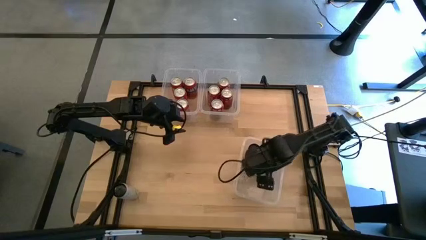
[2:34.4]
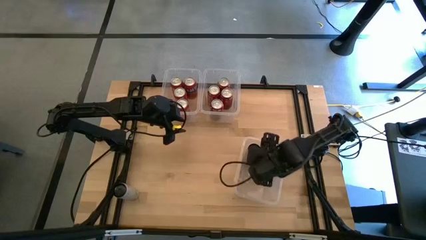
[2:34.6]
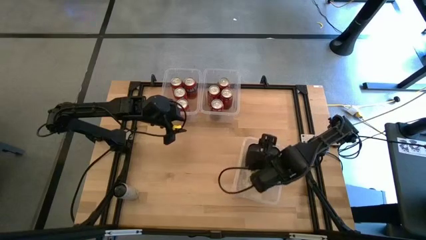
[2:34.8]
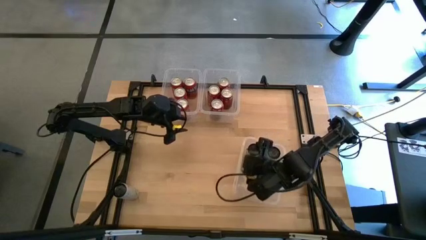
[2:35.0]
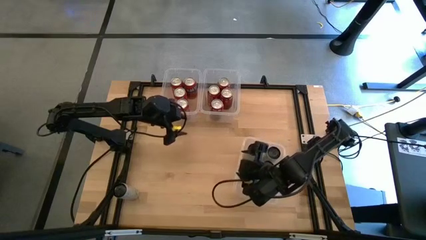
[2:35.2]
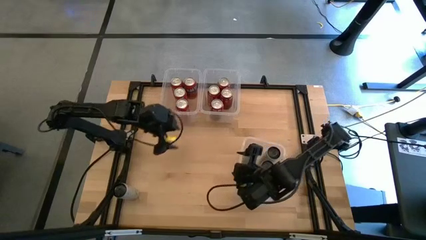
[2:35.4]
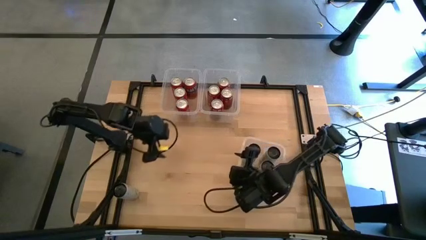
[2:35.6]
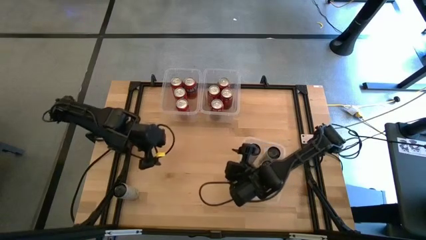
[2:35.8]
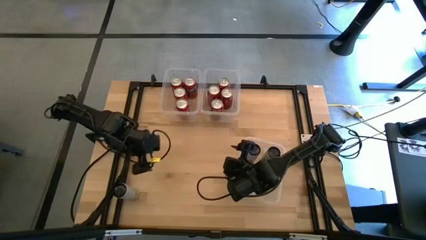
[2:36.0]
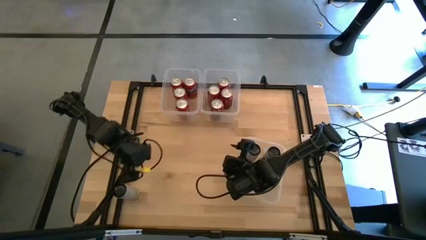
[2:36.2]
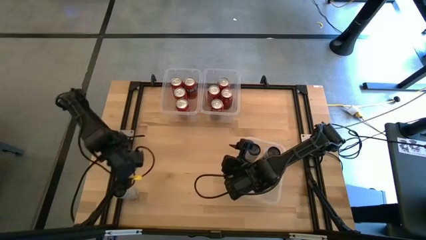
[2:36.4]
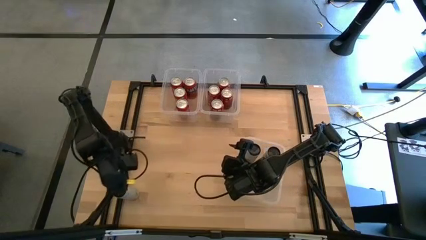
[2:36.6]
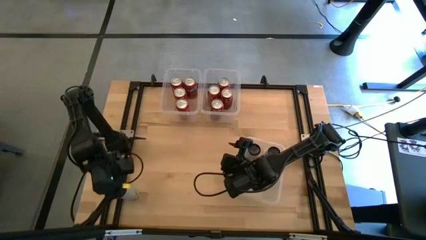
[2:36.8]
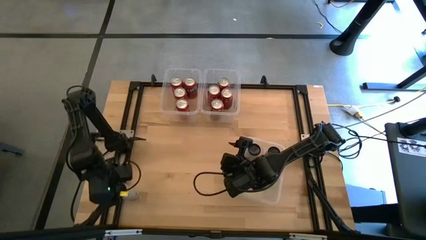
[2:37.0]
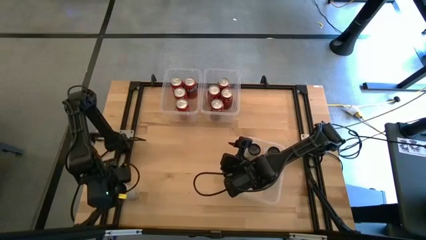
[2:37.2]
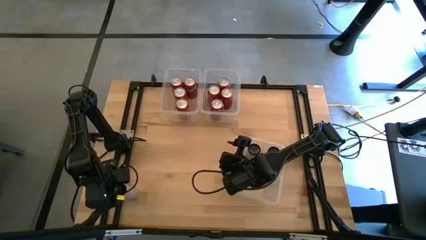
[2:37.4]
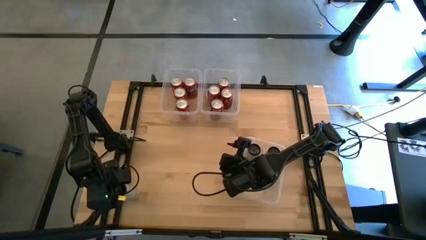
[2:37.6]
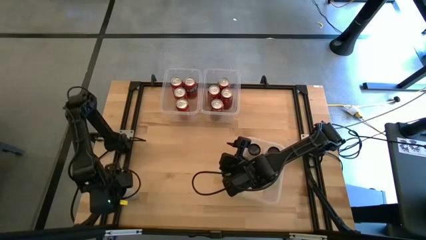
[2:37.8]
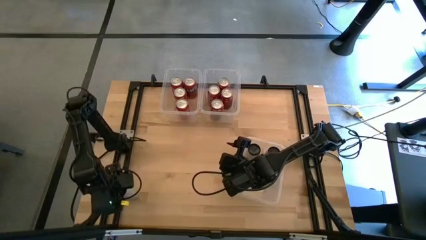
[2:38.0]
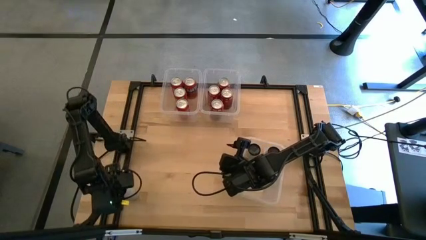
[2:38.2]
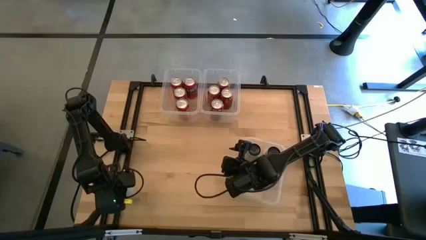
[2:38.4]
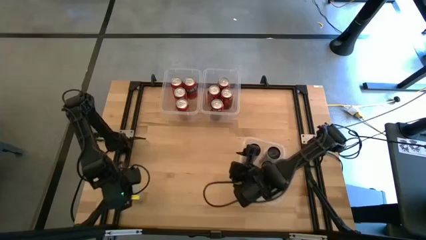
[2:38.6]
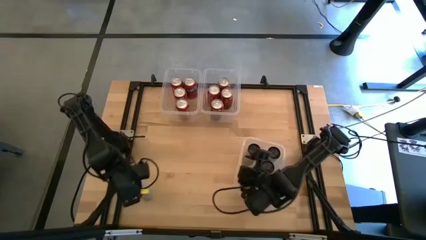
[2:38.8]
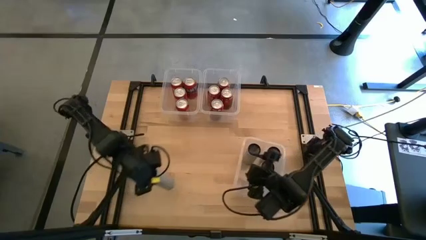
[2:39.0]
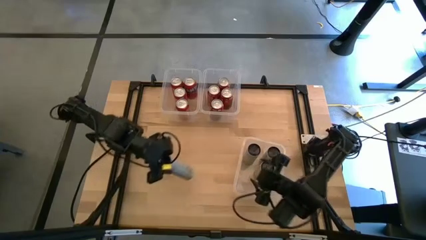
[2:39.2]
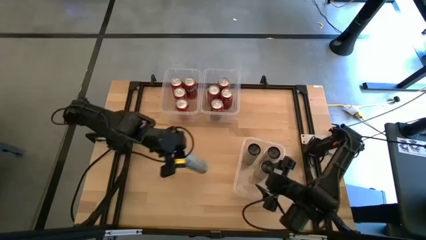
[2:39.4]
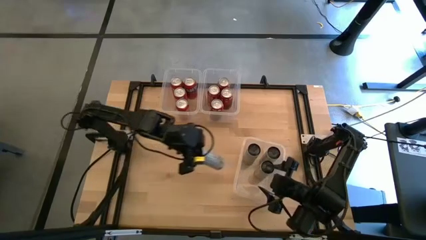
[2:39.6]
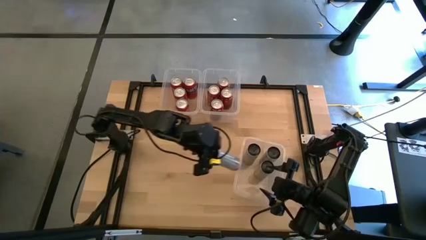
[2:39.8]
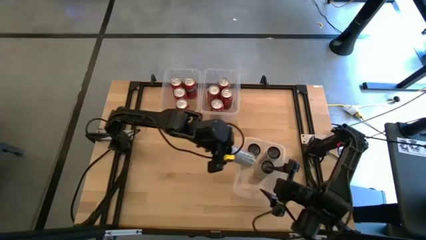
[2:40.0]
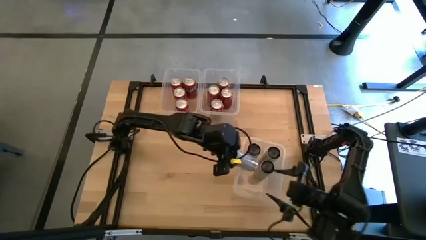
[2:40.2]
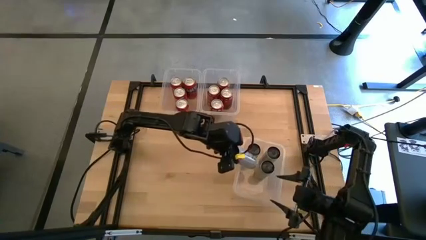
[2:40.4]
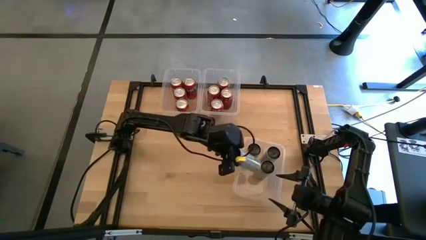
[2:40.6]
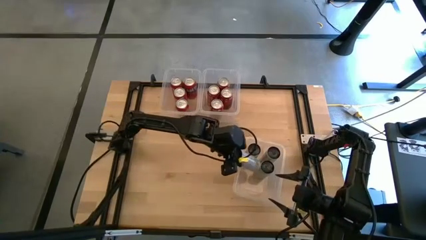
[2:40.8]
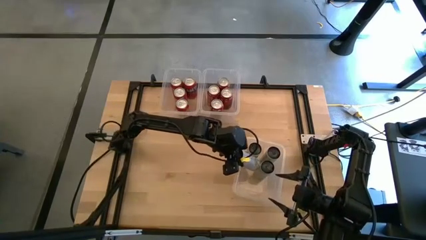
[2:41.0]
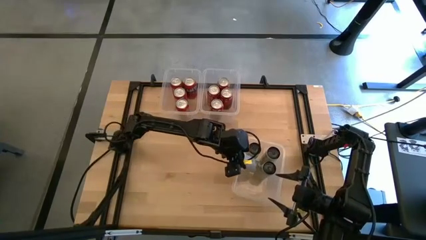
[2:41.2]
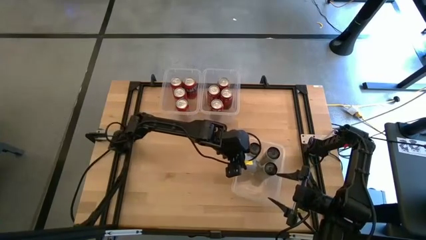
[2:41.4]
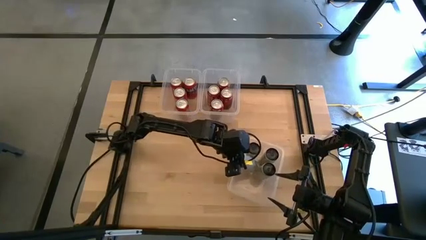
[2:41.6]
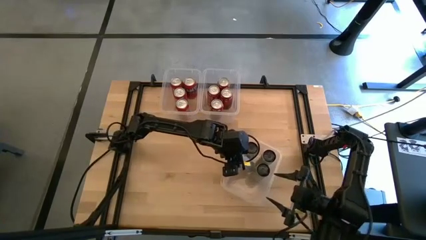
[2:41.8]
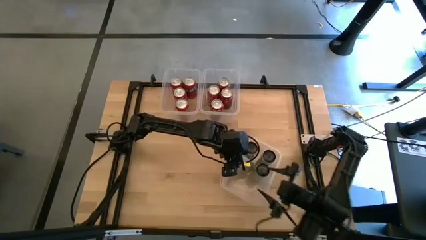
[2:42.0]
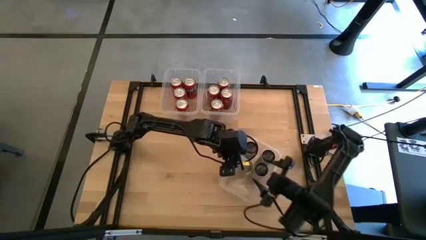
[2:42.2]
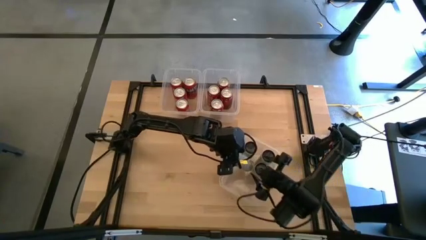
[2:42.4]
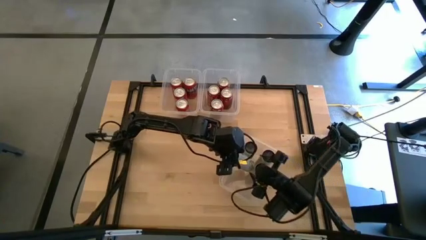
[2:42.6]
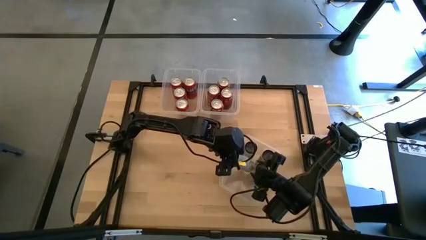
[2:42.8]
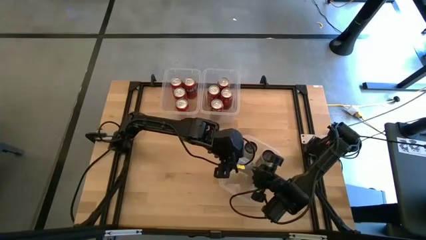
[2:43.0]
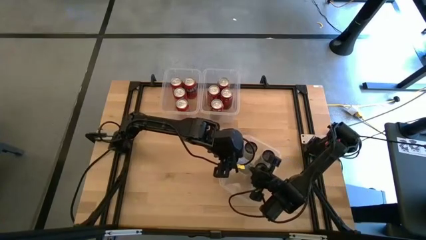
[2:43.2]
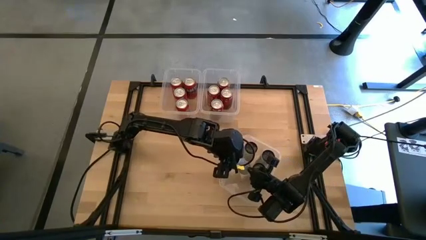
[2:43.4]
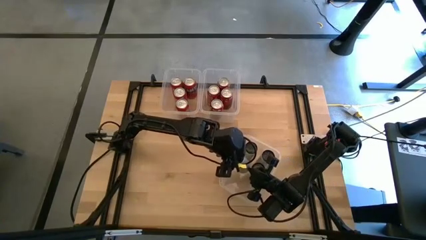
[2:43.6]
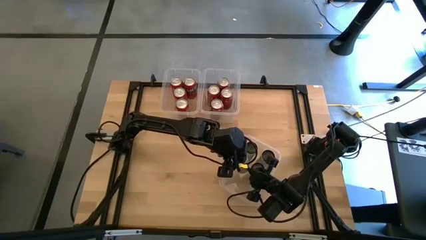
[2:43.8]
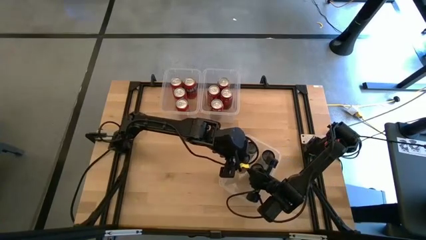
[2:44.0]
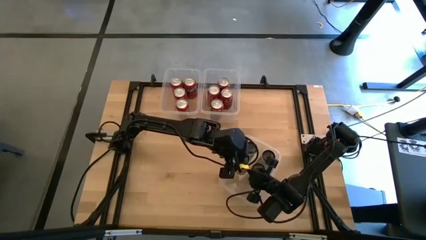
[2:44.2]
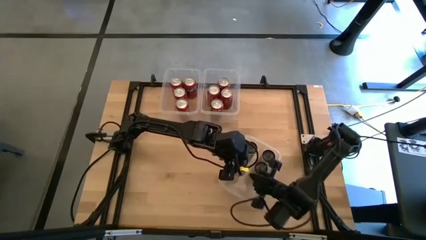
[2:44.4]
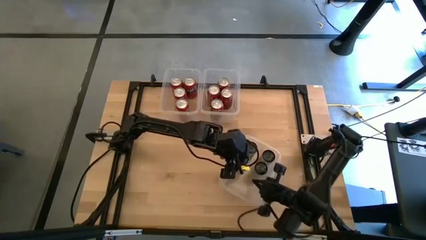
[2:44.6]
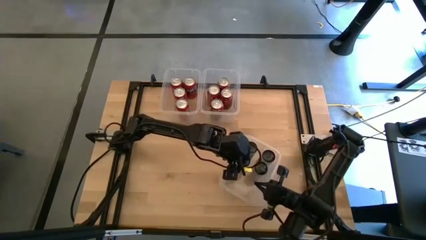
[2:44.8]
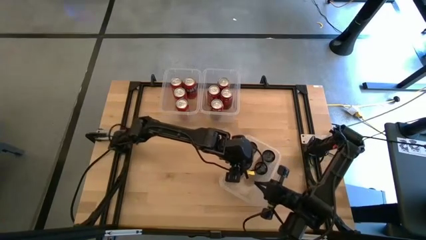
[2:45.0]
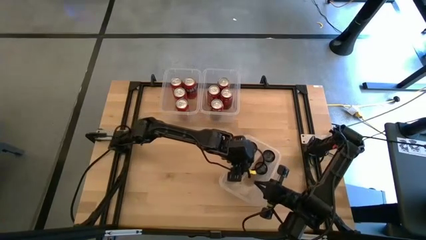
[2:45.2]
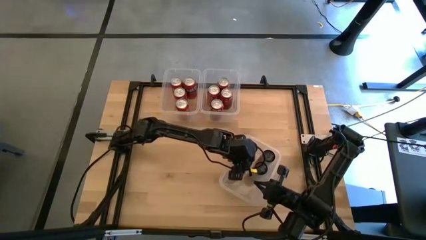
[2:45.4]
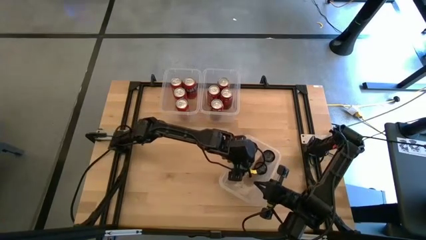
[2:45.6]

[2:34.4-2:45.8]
Task: Sort soda cans
Put the white-yellow soda can into the bottom transparent bin

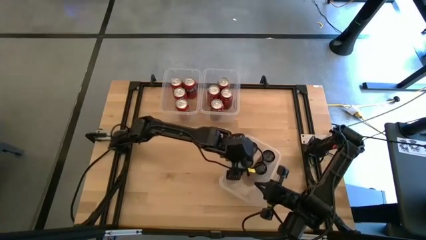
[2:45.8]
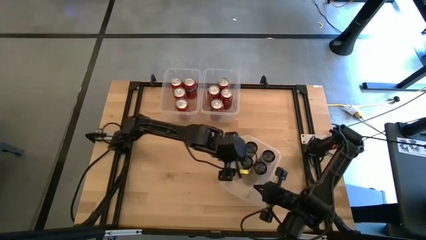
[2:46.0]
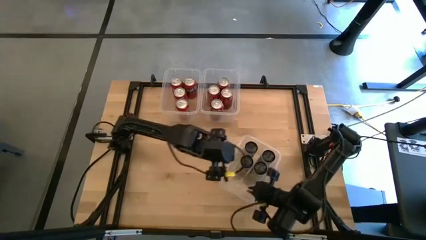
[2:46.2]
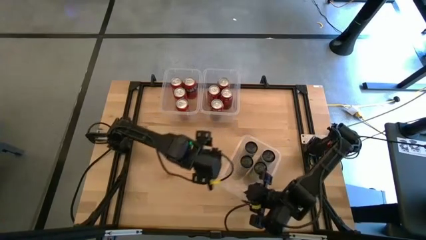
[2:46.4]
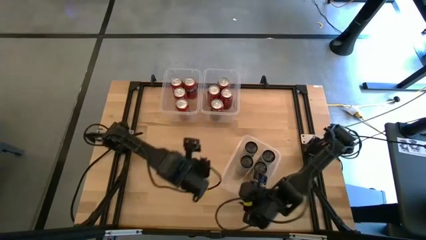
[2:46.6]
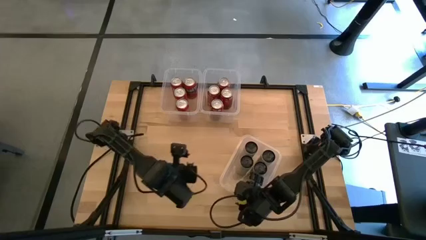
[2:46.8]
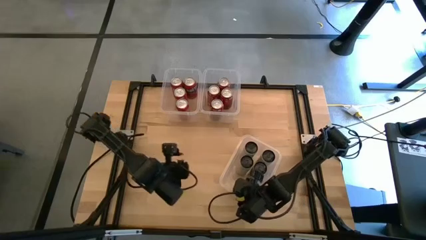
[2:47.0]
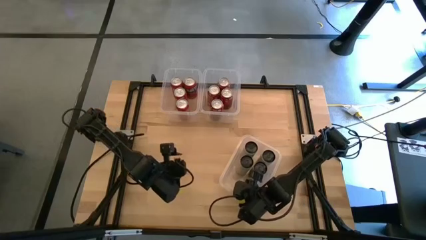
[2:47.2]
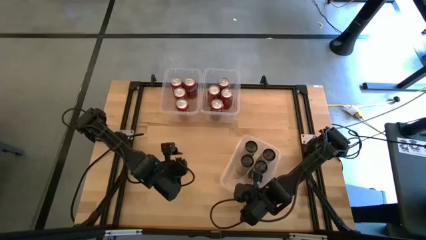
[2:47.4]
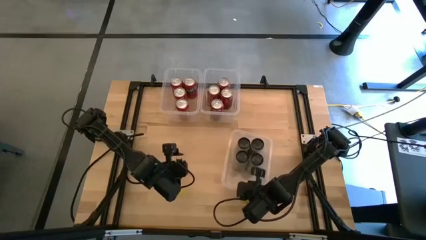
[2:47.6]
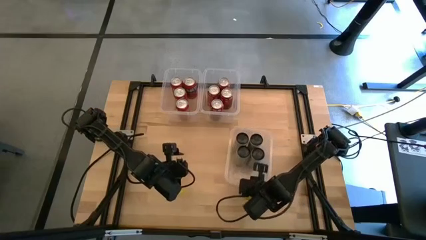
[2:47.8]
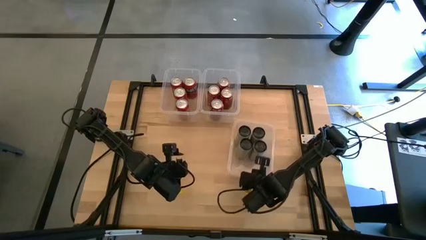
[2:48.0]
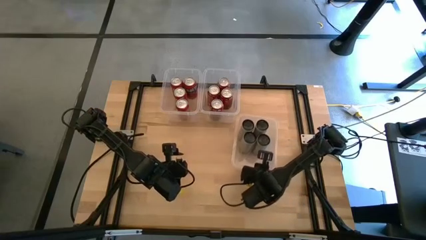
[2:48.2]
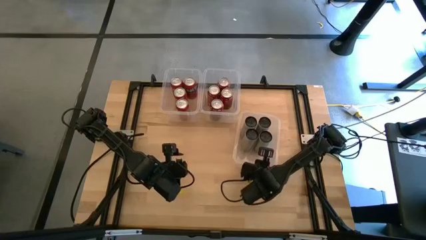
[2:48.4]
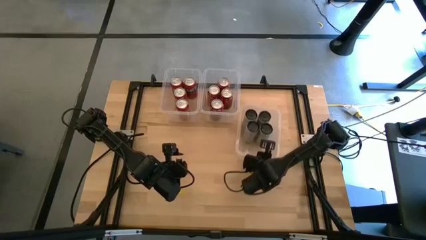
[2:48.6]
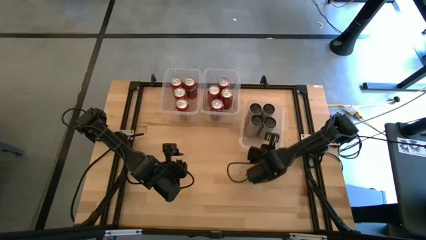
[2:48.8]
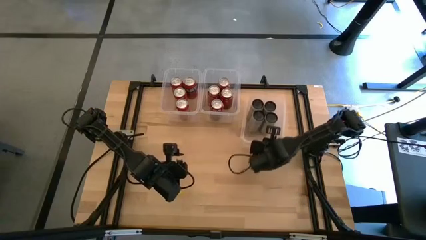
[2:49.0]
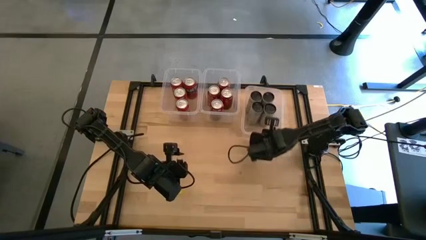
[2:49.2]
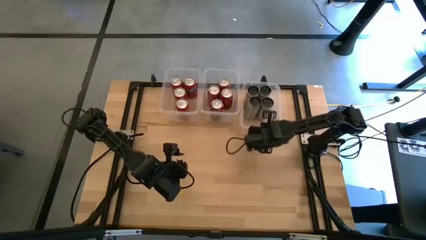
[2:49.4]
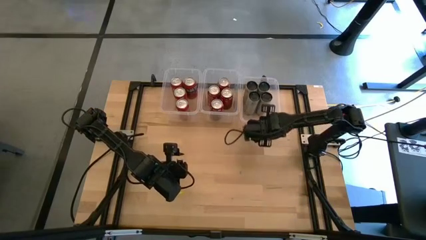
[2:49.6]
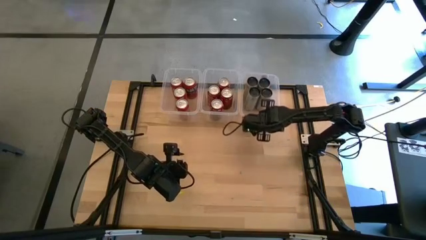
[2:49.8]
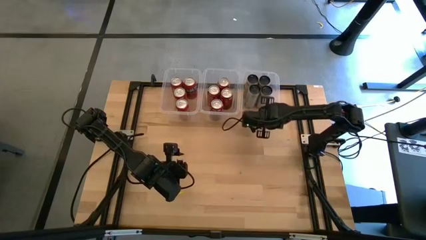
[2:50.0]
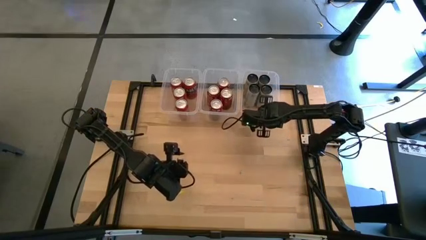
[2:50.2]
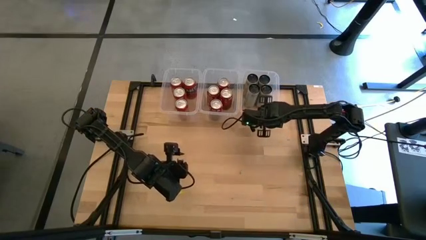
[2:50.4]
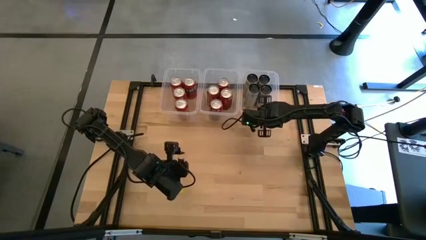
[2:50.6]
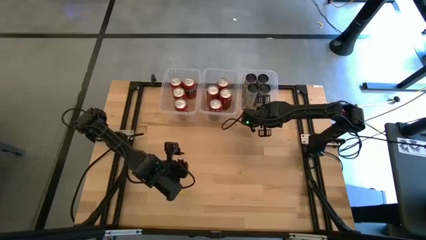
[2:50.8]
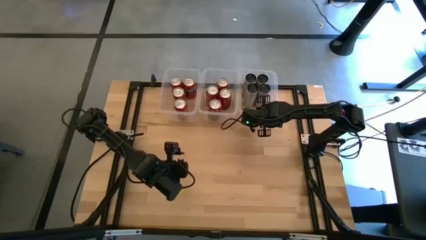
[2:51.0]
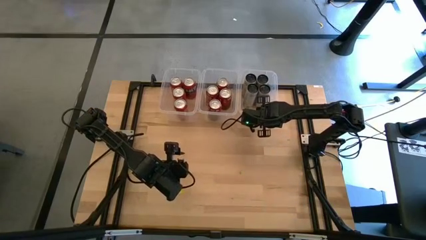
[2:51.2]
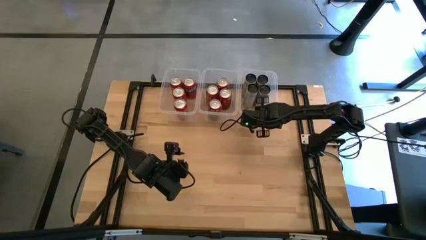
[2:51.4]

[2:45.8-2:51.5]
Move the bottom transparent bin to the top right of the table
